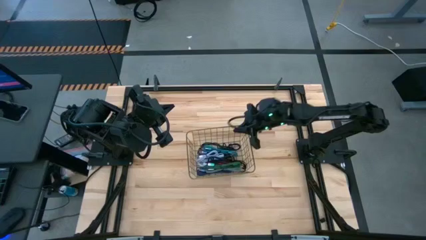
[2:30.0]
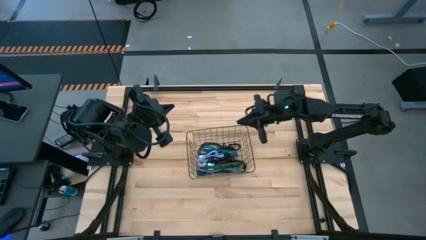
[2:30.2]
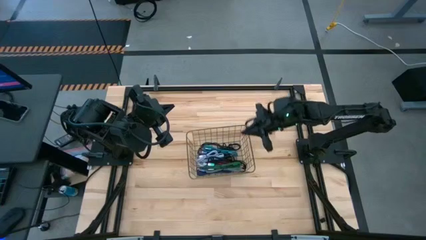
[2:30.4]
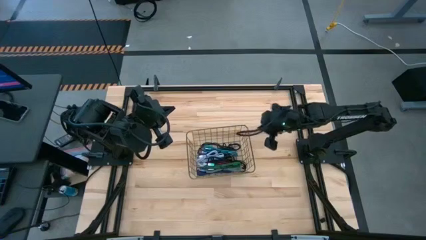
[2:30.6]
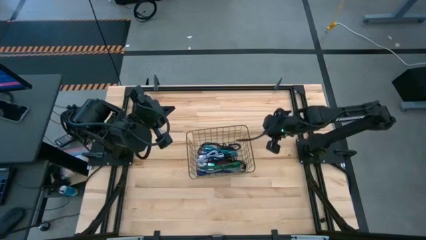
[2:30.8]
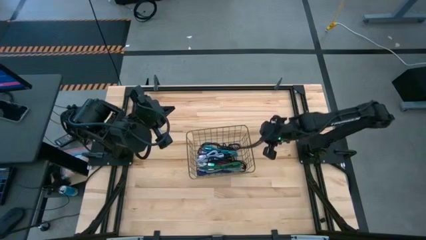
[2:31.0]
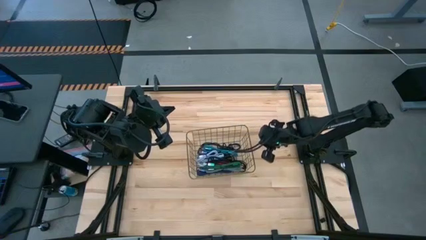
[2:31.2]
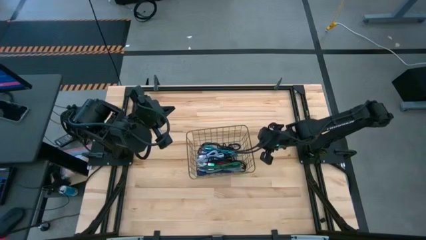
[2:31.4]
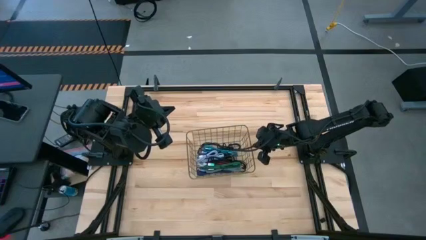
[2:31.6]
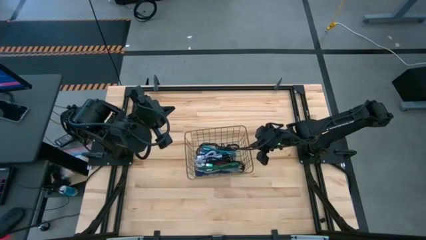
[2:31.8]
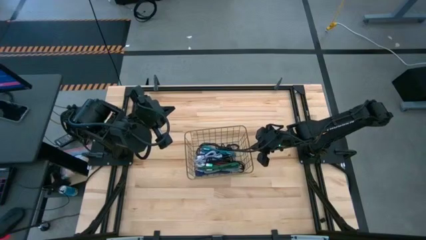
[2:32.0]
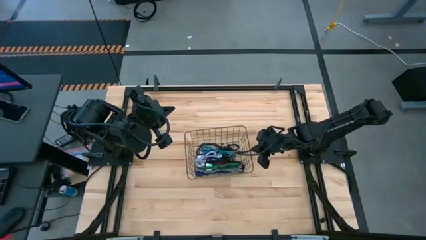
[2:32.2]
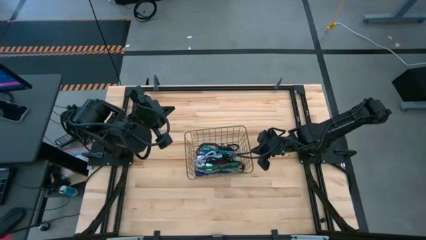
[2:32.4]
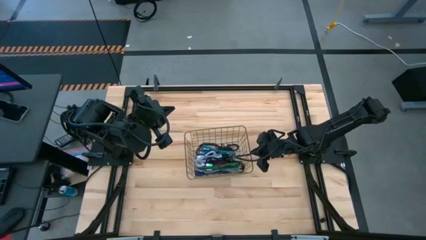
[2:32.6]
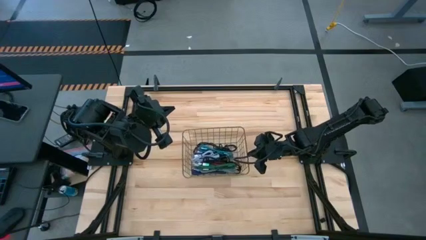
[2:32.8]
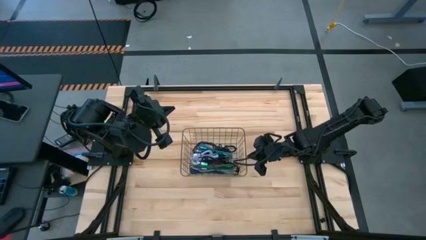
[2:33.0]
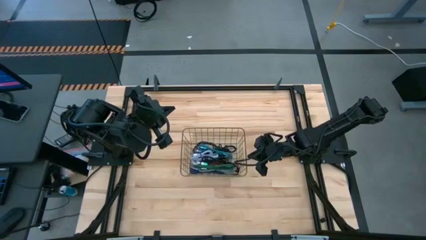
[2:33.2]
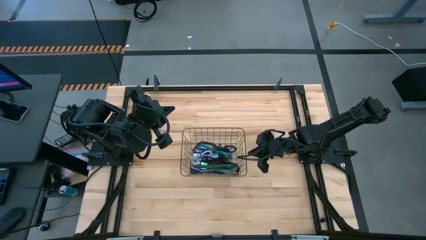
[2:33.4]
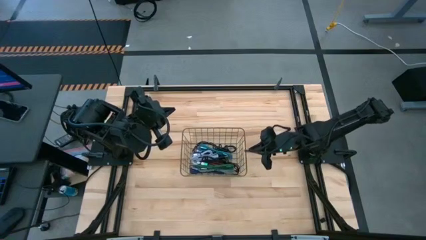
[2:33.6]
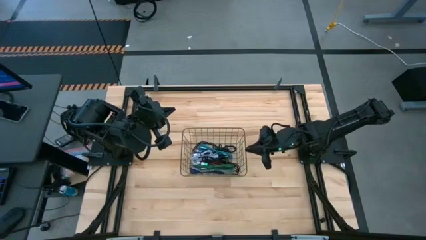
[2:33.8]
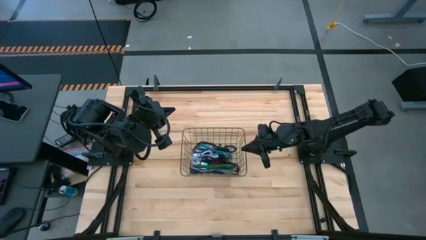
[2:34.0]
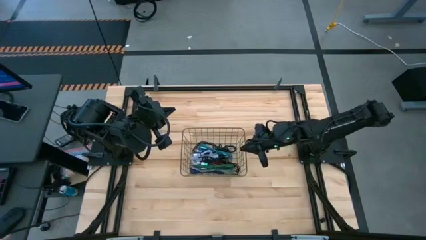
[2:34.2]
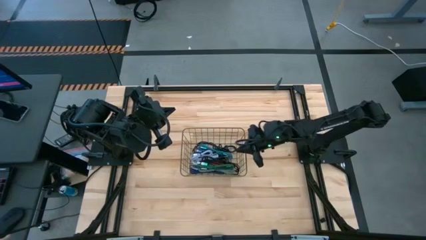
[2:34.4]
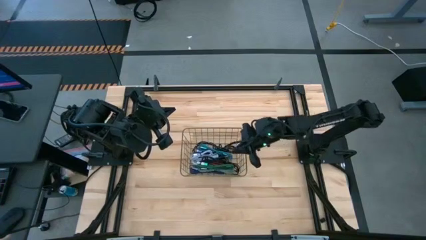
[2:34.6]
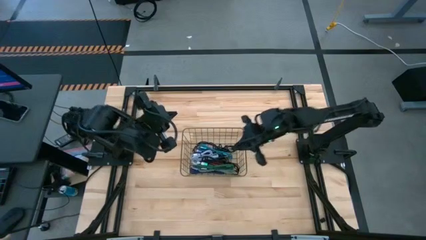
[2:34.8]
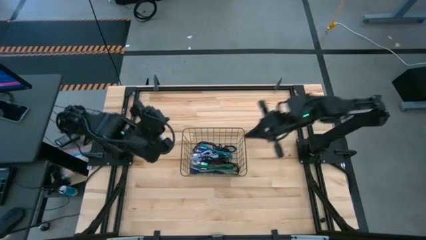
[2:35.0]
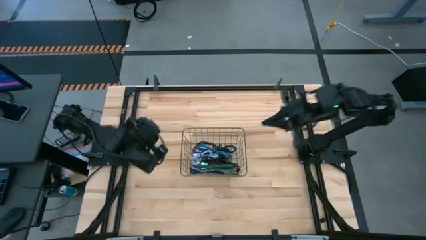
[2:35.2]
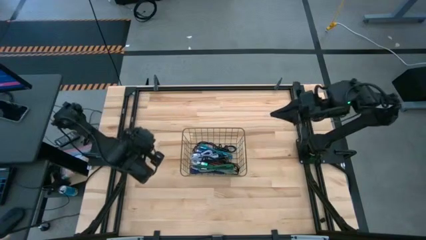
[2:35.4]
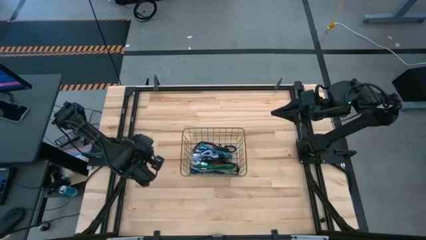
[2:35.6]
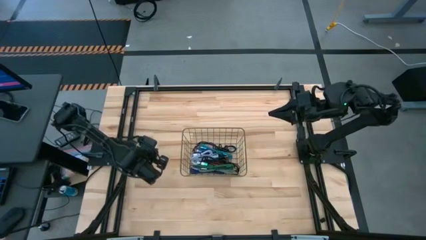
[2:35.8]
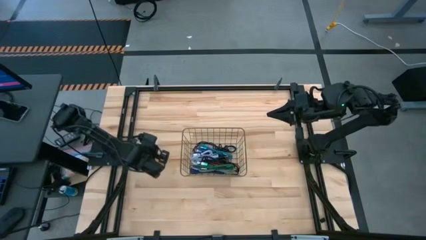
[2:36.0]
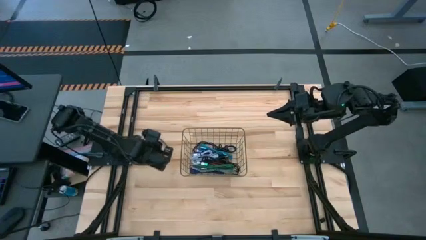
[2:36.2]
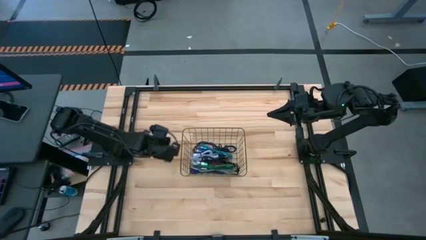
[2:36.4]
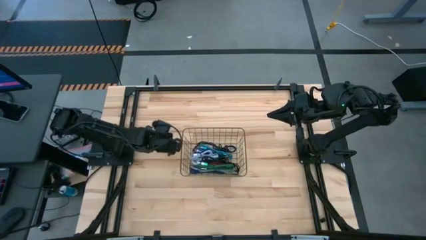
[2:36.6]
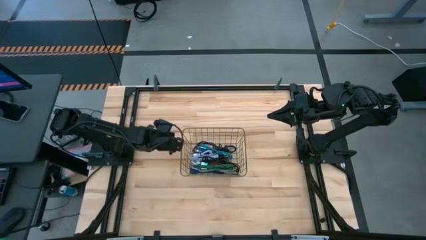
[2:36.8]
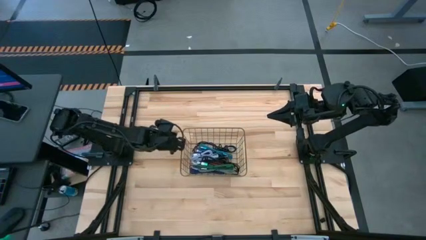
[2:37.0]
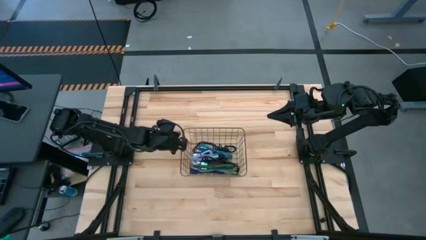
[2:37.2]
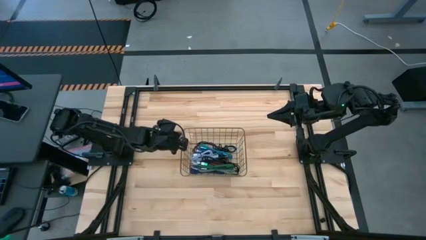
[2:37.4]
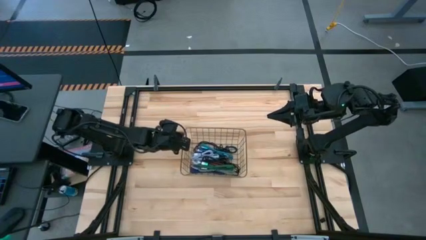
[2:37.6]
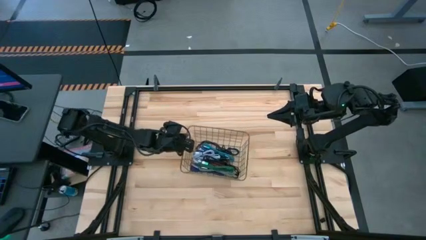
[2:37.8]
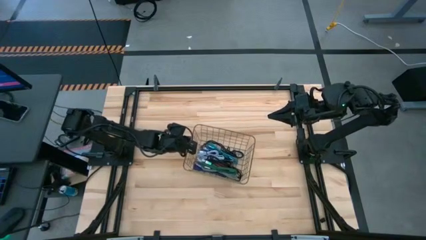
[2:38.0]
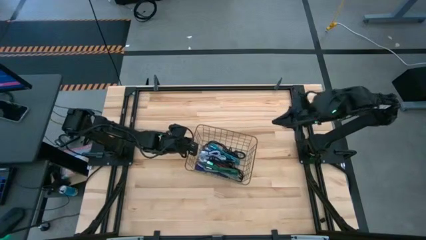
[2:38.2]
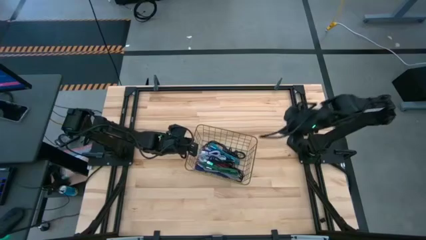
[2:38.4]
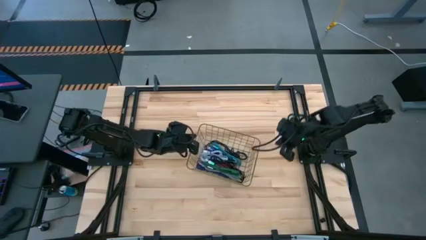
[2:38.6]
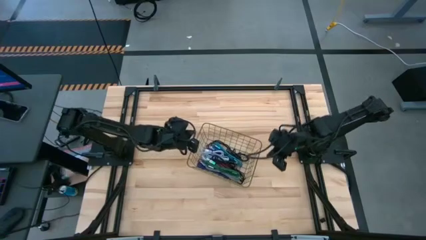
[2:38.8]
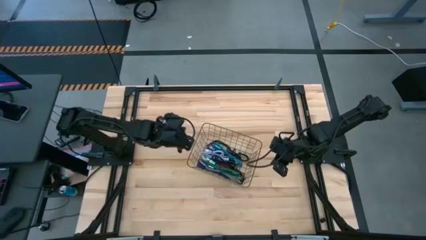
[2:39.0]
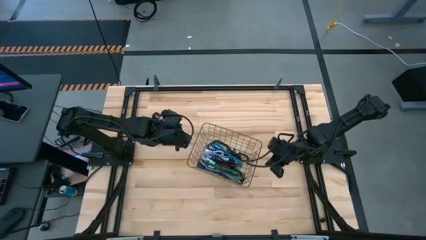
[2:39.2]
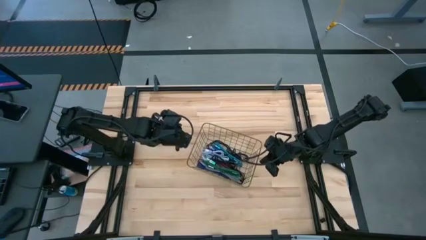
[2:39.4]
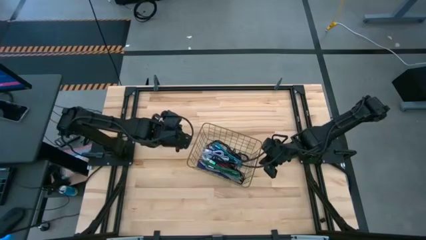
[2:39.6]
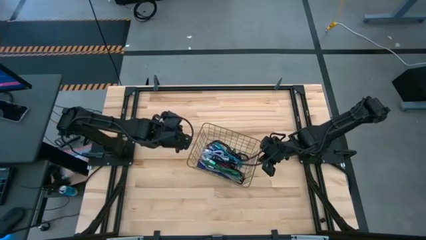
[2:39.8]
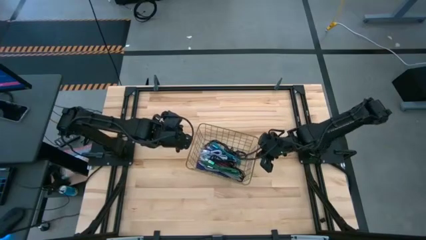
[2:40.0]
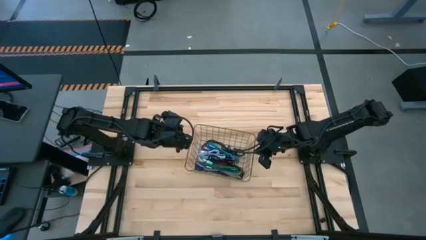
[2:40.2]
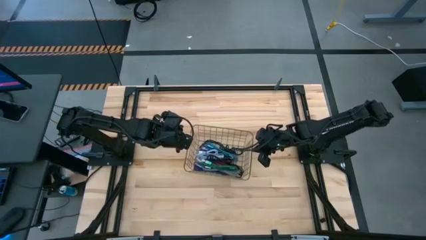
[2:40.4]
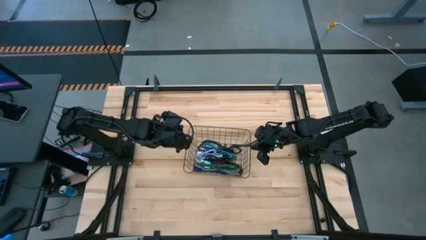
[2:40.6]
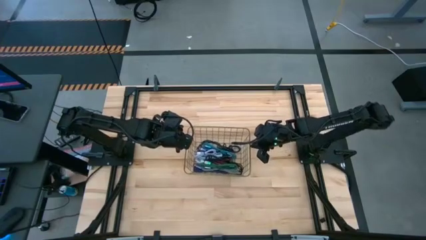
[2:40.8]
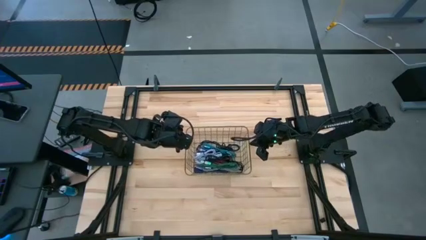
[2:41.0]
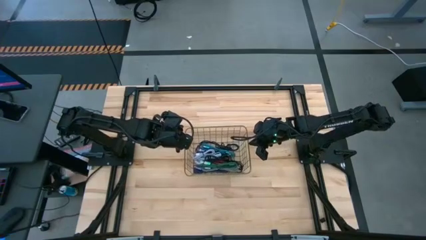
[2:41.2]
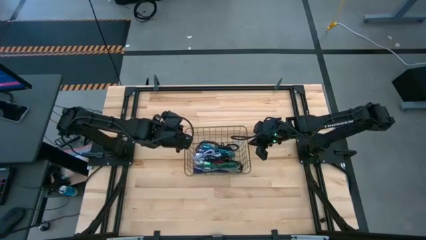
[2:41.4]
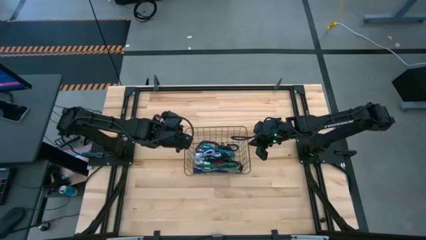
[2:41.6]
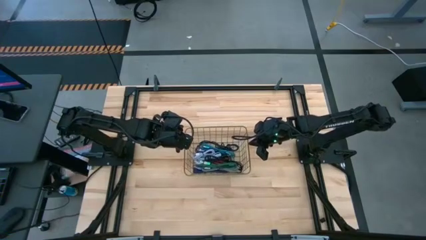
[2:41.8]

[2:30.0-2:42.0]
Task: Pick and place USB-C Cables
Adjust the wire basket
